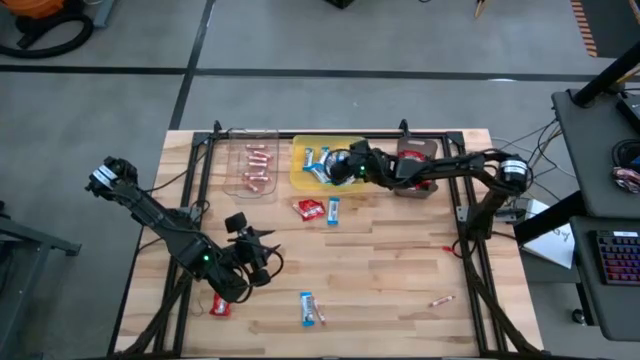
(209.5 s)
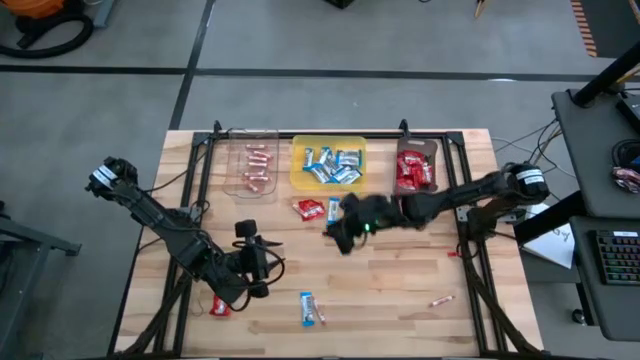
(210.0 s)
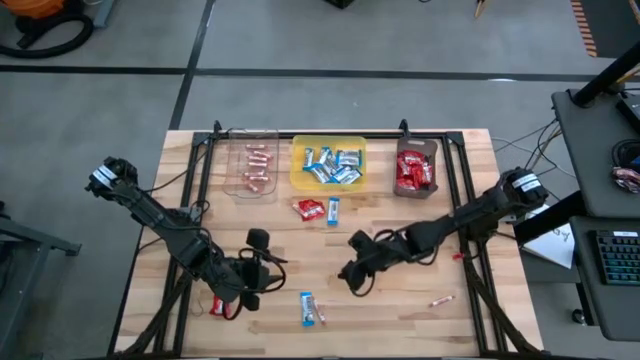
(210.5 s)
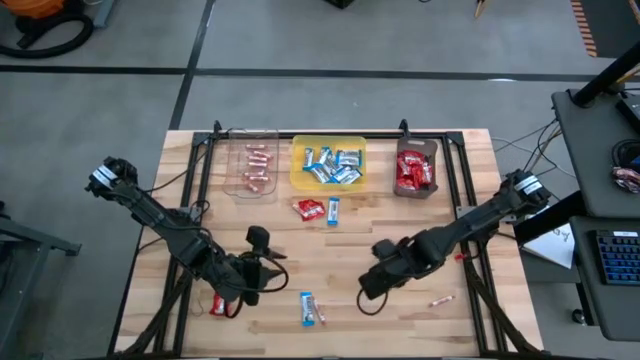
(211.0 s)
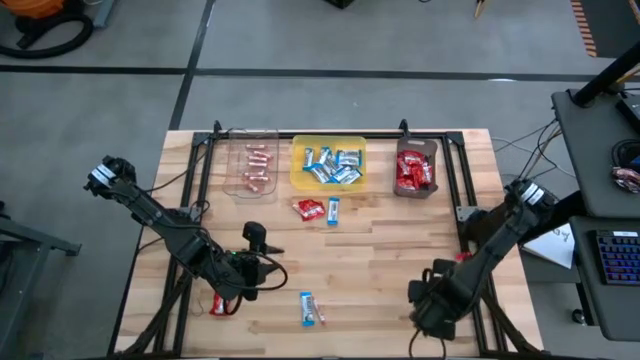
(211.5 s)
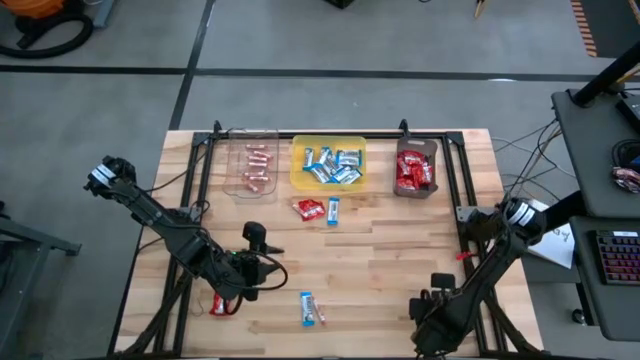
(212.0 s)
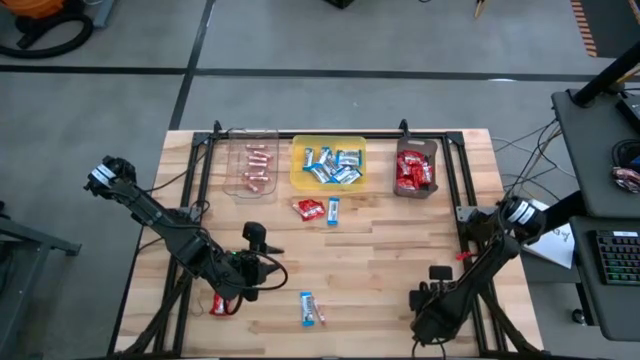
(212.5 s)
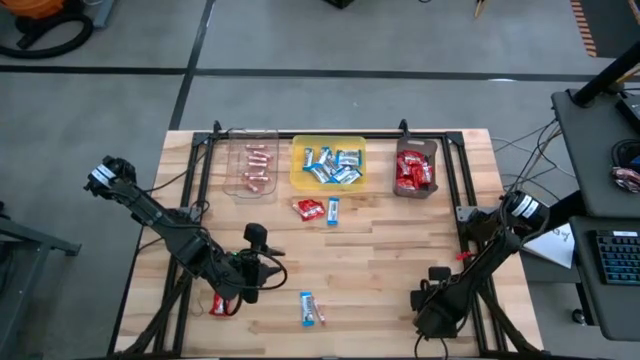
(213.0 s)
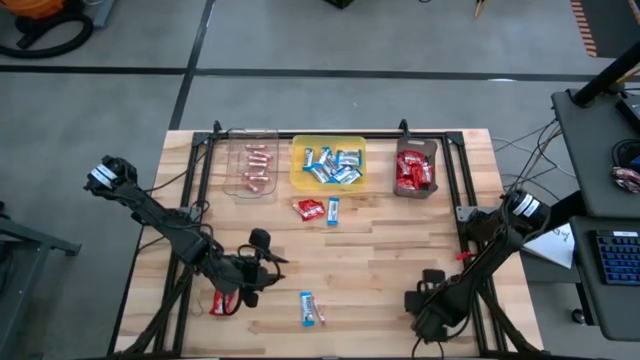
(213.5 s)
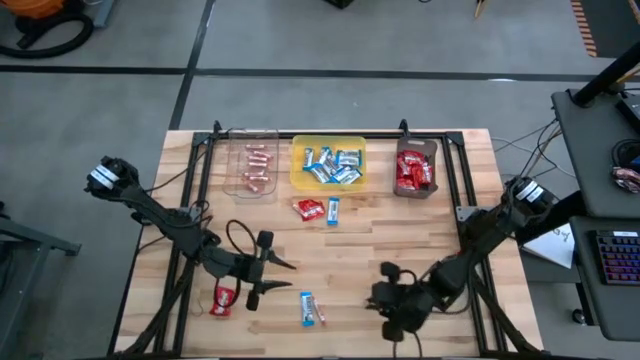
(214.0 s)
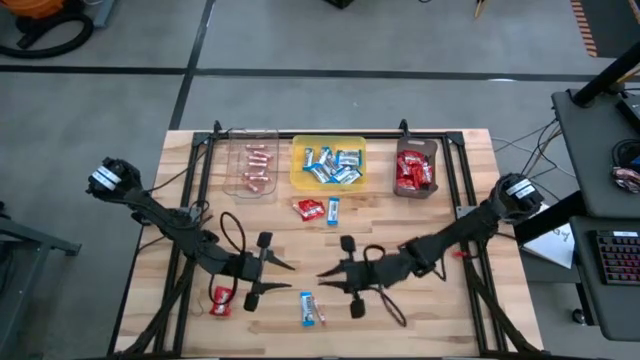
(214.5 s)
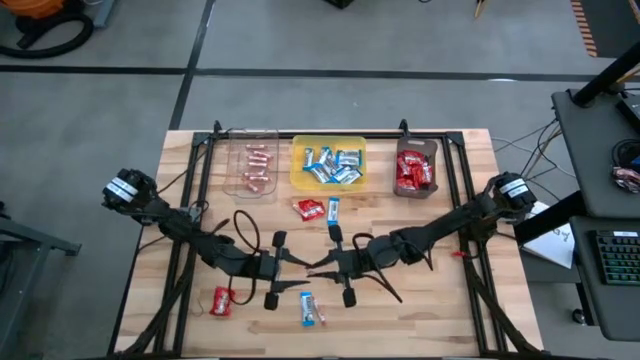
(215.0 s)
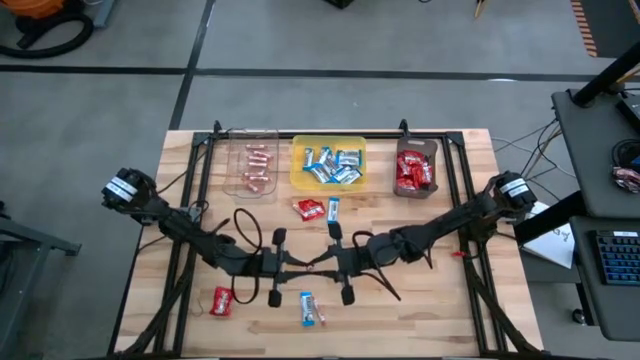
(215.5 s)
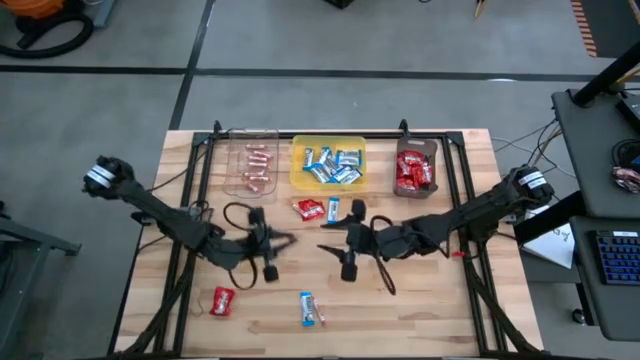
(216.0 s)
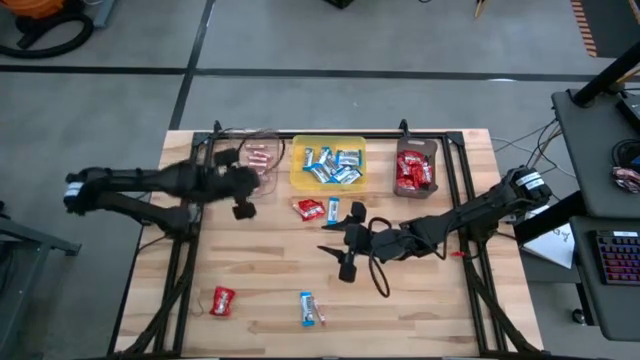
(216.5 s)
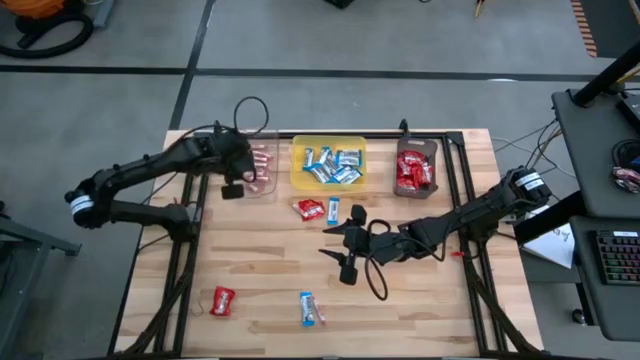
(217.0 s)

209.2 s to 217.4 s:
Task: Sort candy
Put the orange candy into the transparent bin

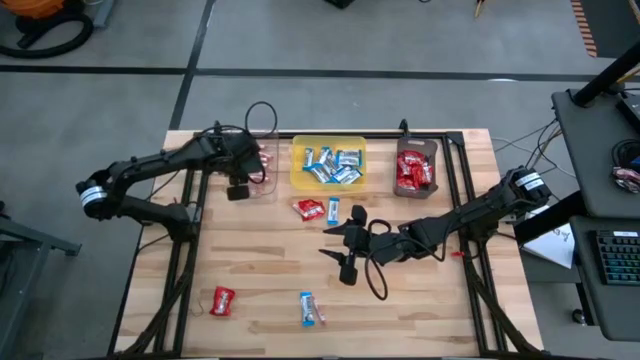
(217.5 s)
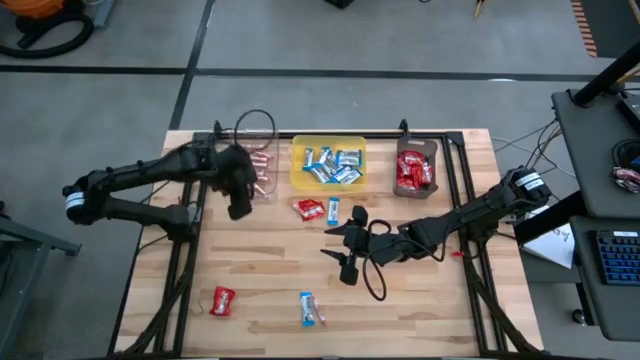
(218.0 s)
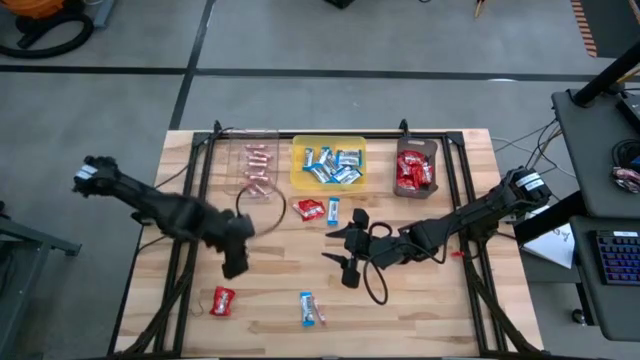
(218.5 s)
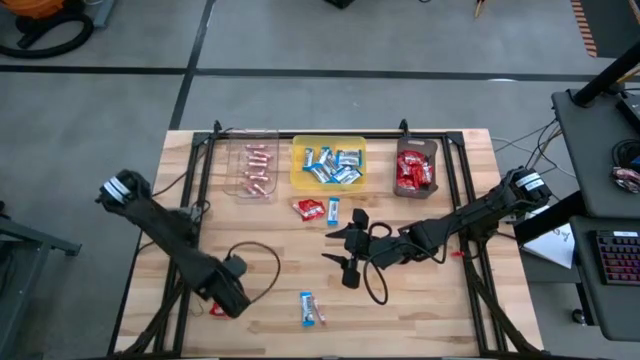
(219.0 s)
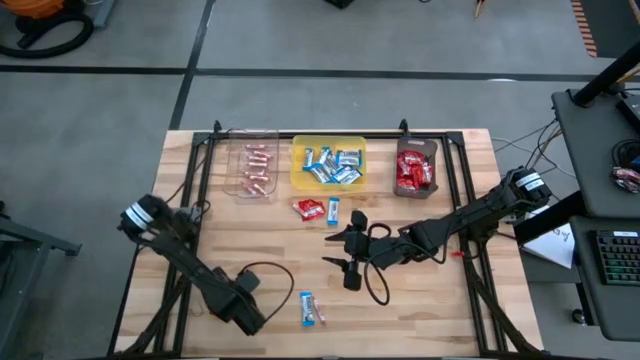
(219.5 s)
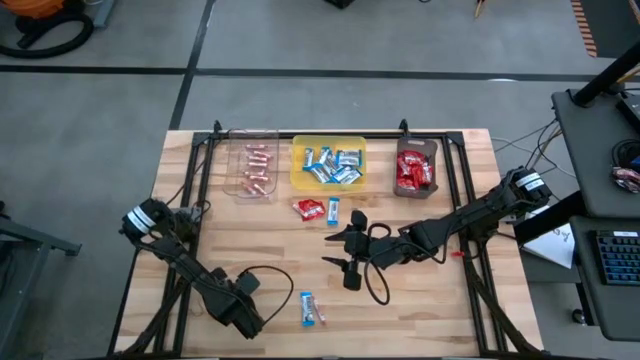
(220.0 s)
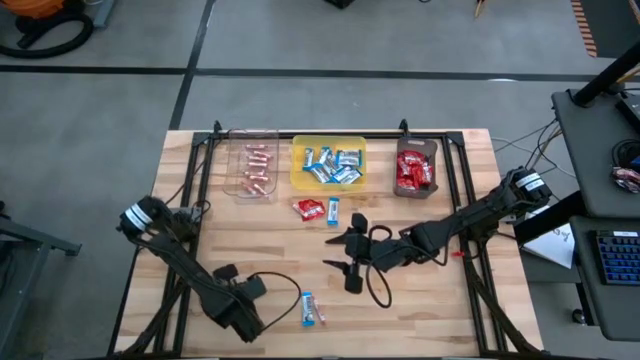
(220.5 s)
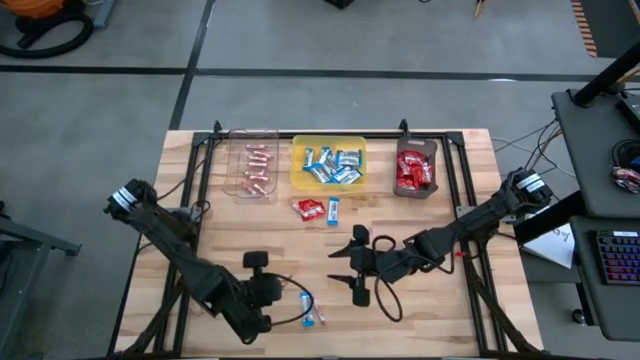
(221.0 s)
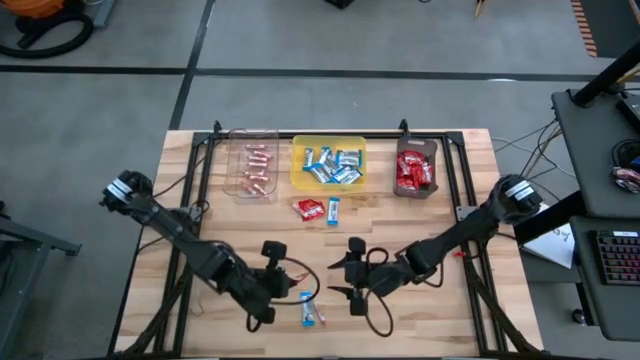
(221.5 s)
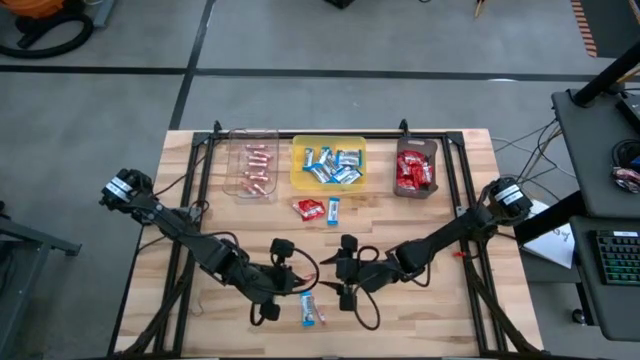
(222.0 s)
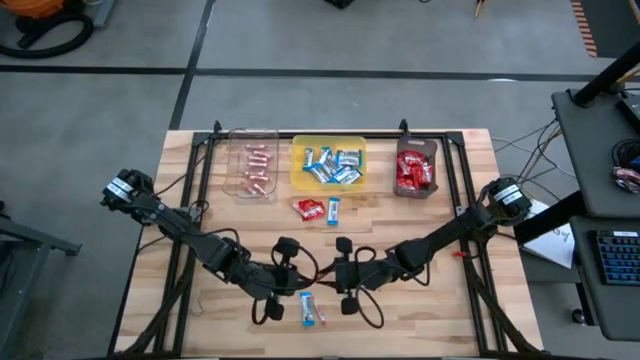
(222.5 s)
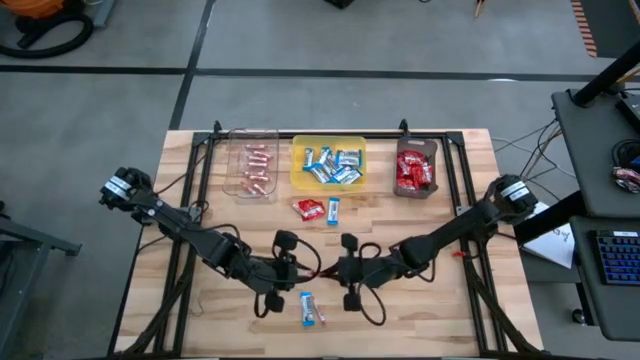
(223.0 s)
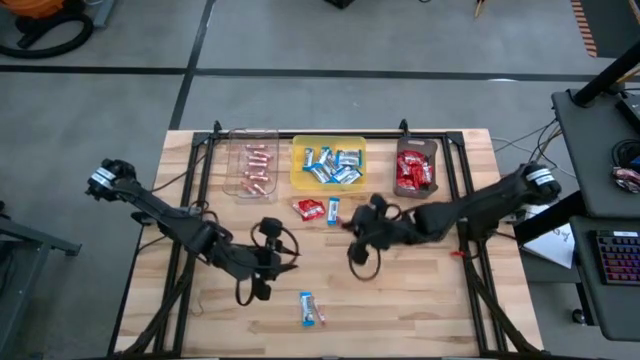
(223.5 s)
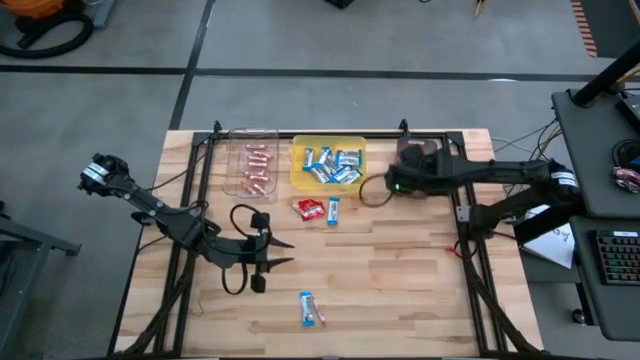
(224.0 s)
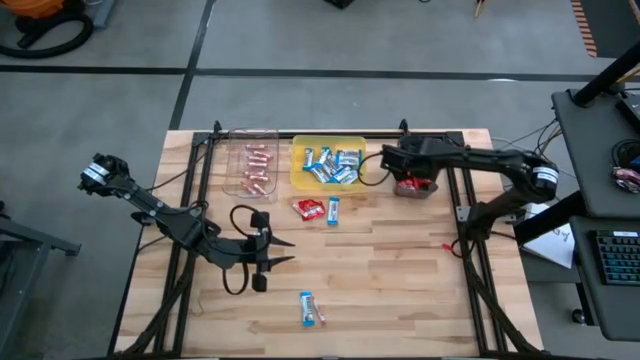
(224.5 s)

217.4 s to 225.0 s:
Put the red candy into the black bin

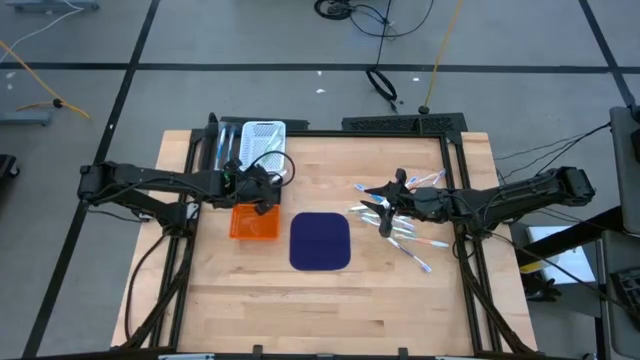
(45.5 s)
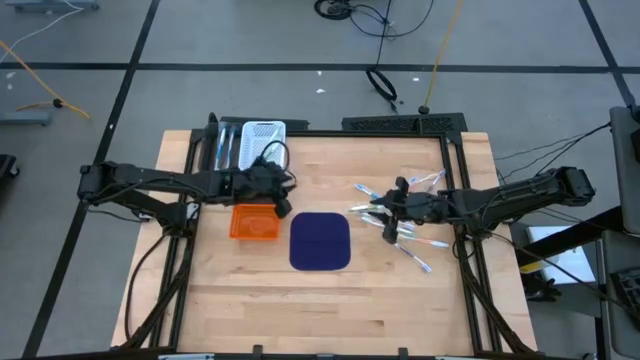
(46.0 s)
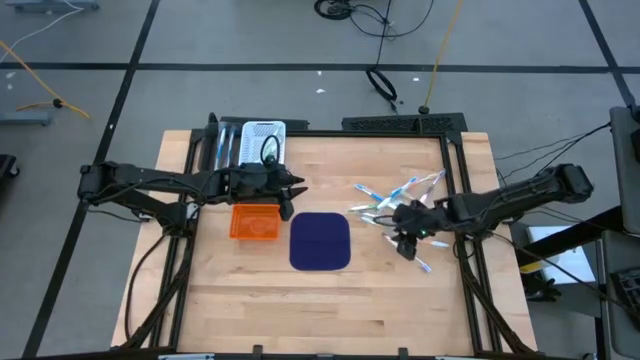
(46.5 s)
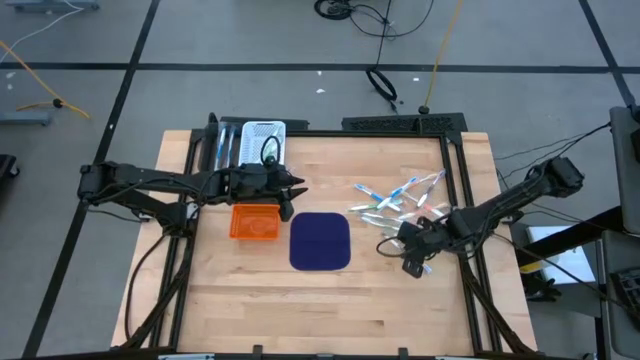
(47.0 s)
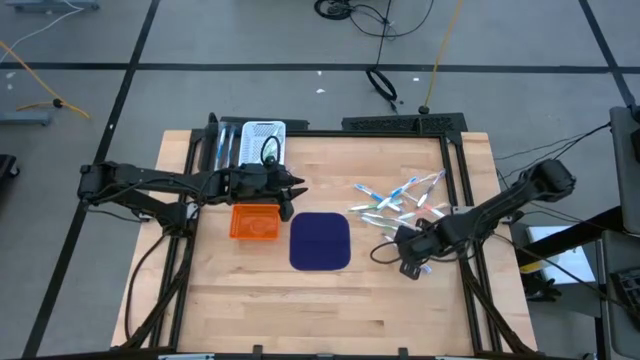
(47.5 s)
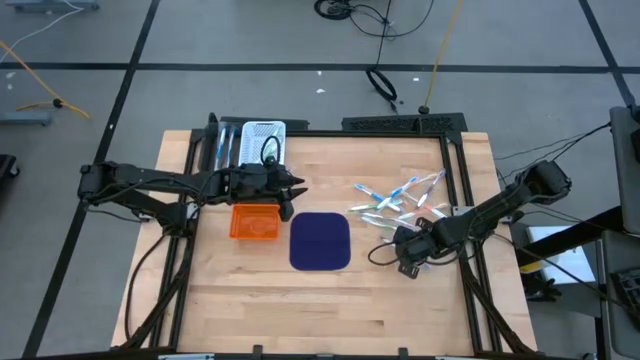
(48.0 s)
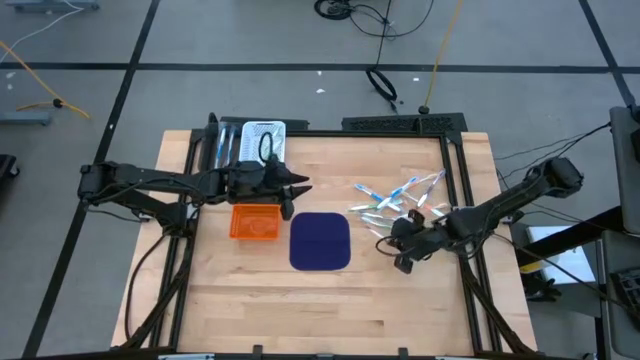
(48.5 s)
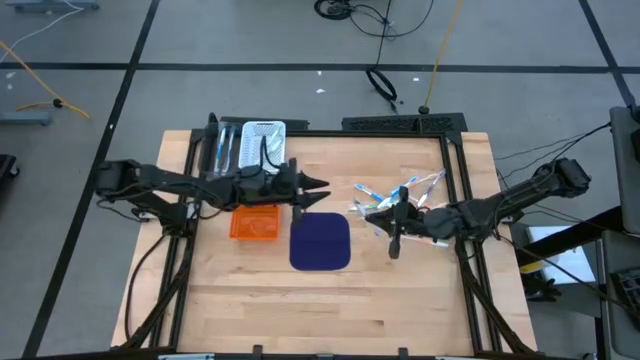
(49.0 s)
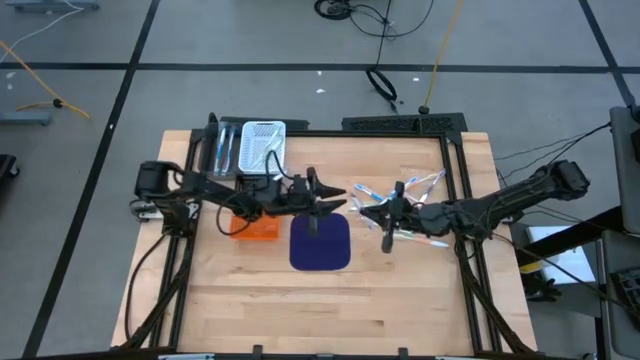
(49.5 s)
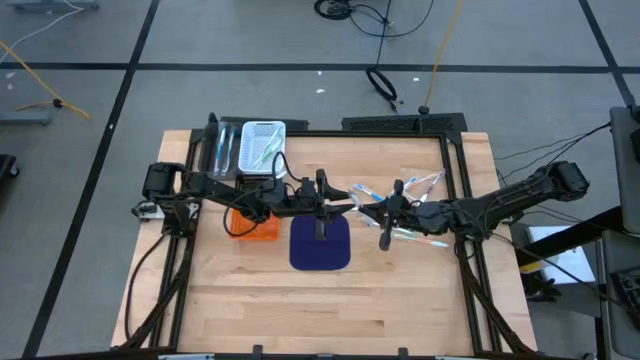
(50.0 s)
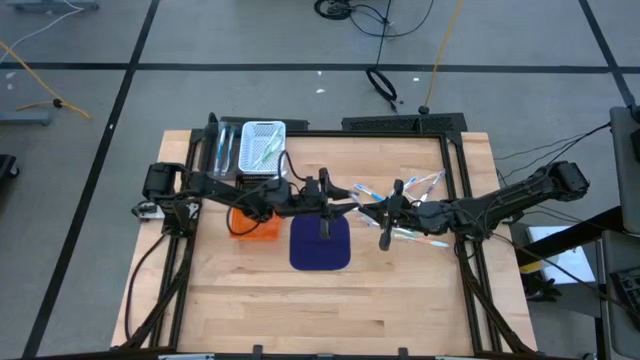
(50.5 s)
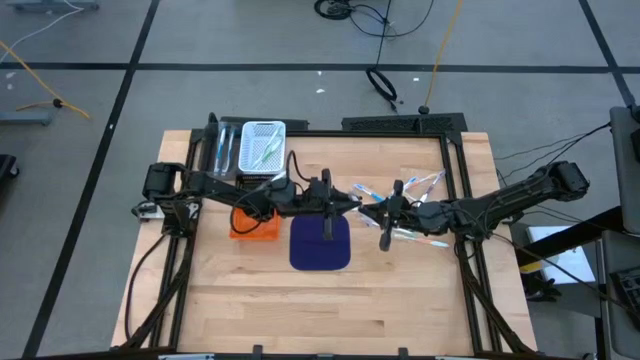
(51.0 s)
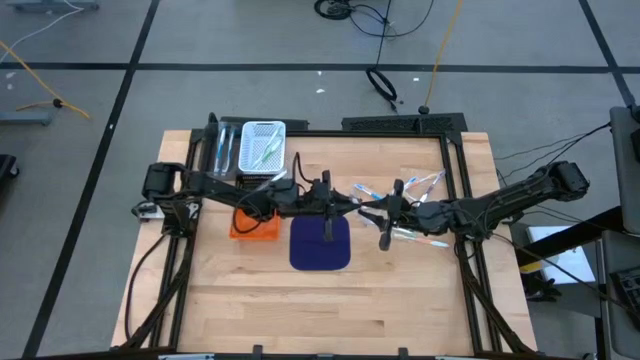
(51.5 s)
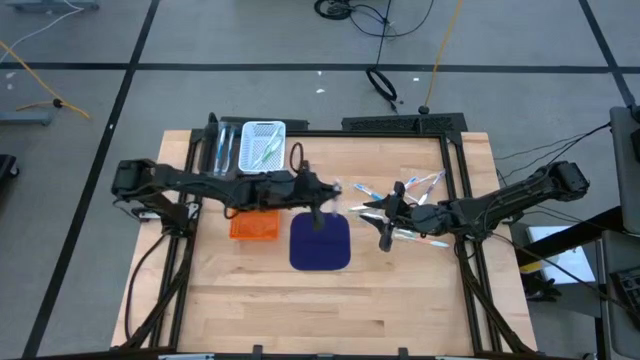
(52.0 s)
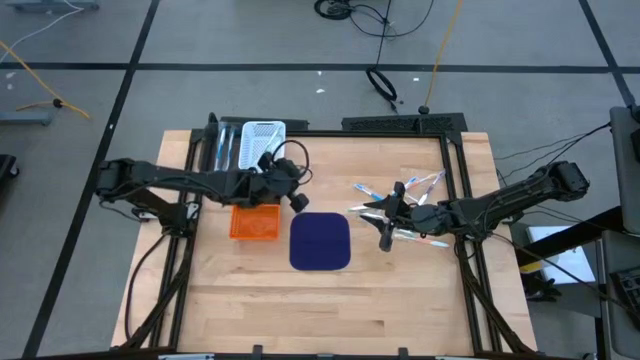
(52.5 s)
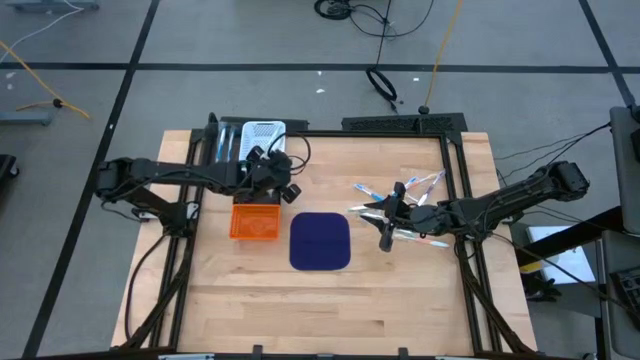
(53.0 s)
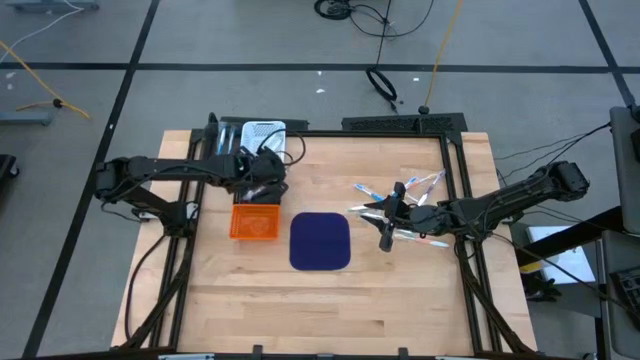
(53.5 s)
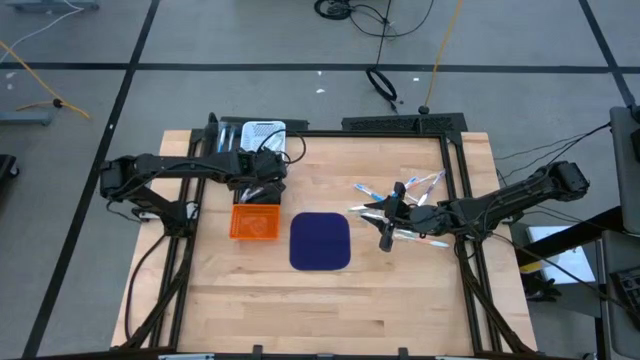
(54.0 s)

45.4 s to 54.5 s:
Task: Pick & Place Toothbrushes
Put the violet toothbrush into the black bin
